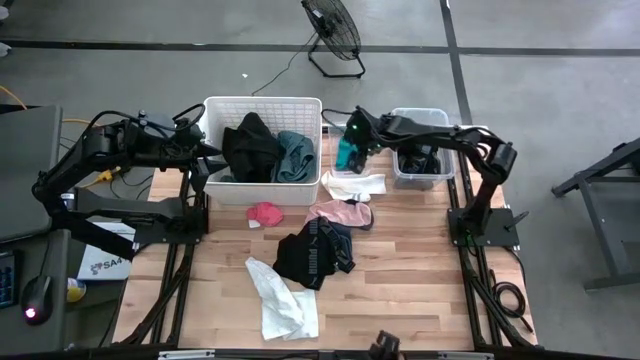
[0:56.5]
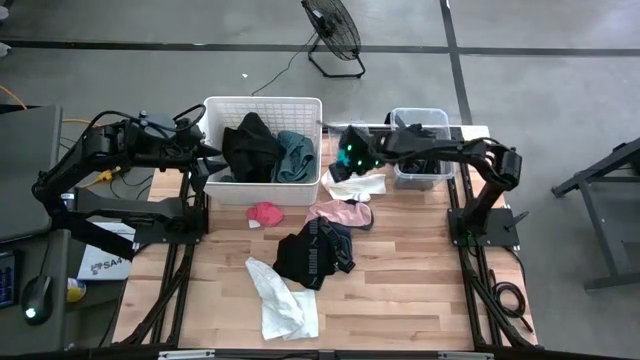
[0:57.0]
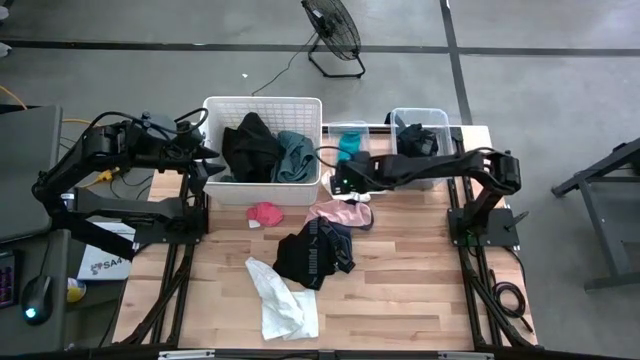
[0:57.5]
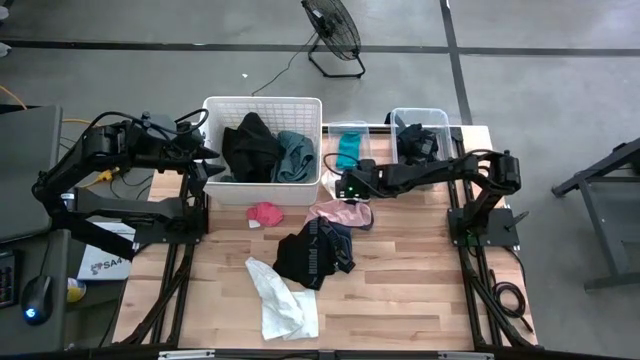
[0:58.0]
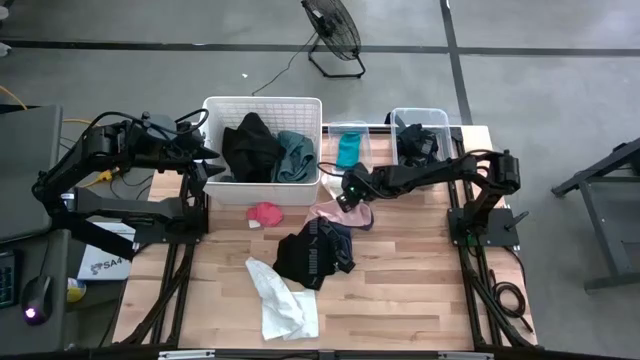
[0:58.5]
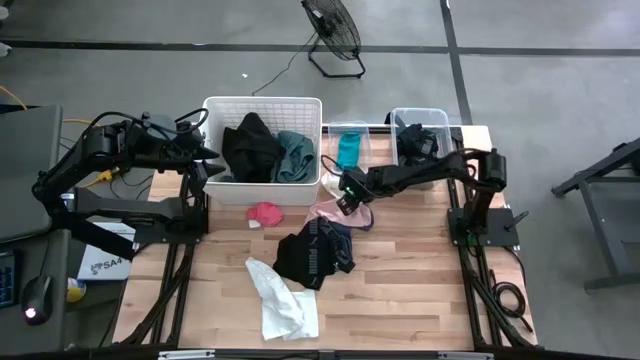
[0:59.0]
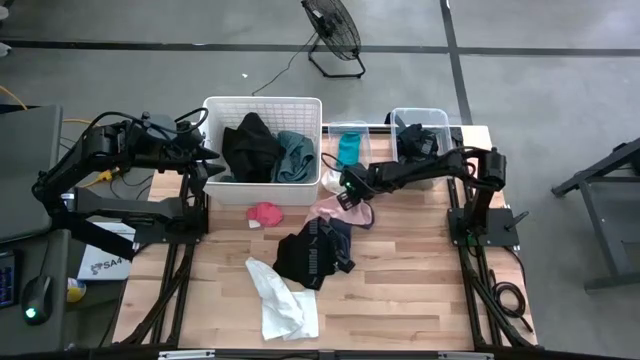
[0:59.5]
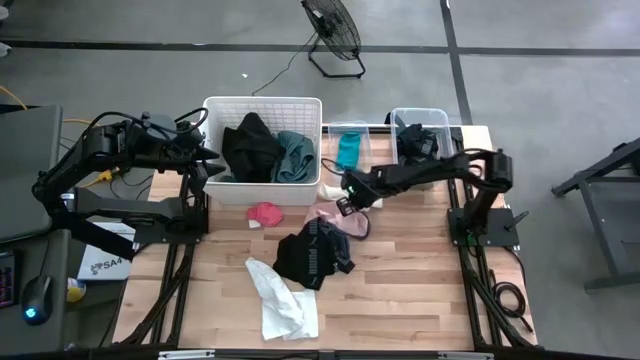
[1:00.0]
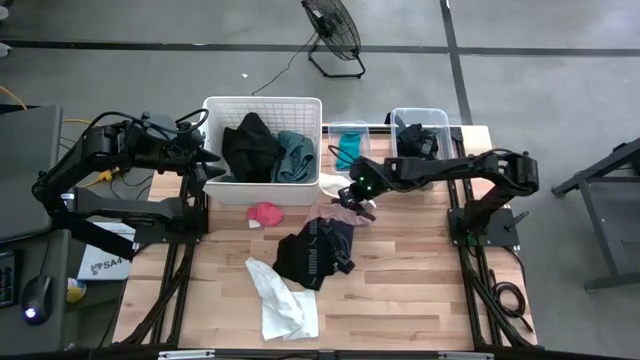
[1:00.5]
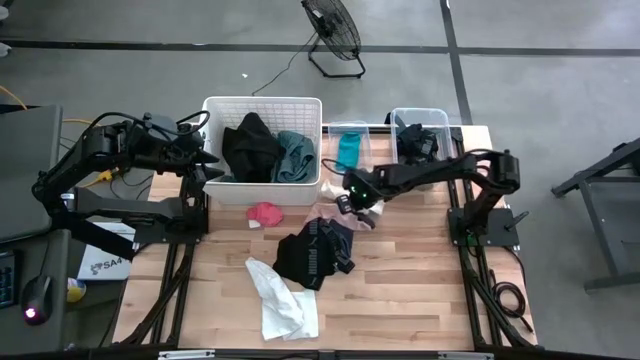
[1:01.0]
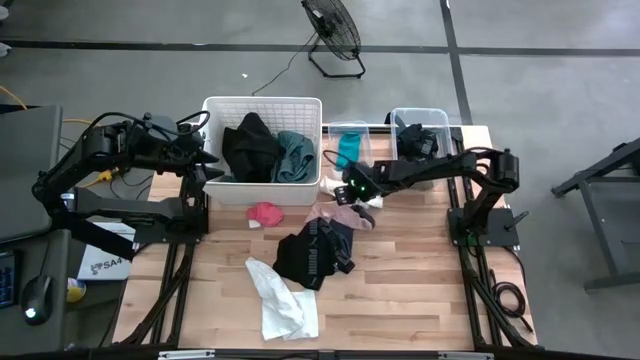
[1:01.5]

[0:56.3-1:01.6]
Task: Pick & Place Cloths
Put the white sock into the left transparent bin

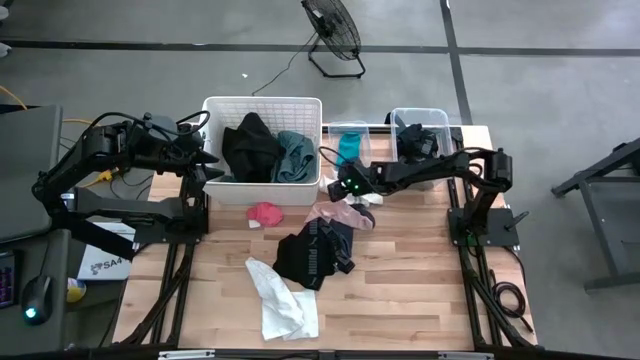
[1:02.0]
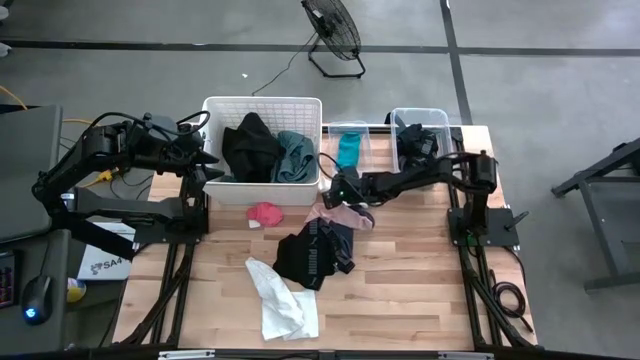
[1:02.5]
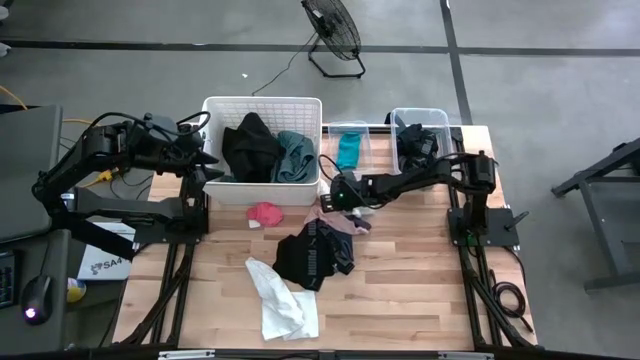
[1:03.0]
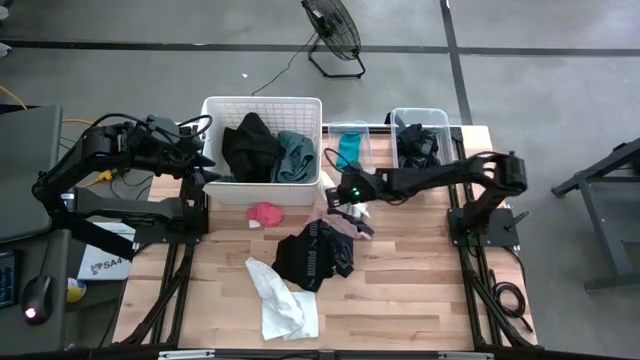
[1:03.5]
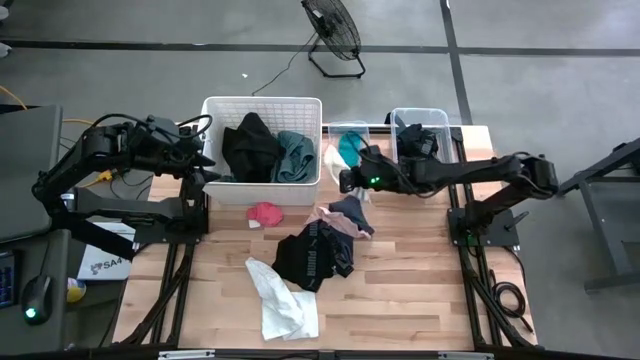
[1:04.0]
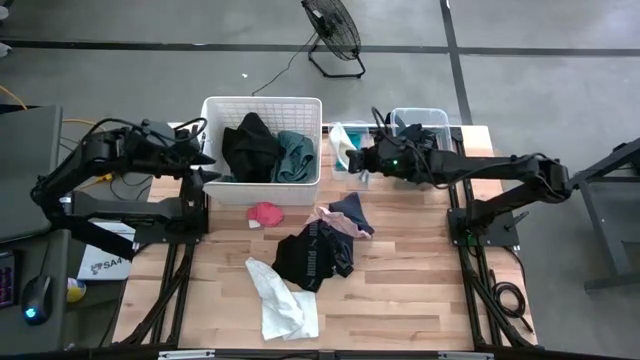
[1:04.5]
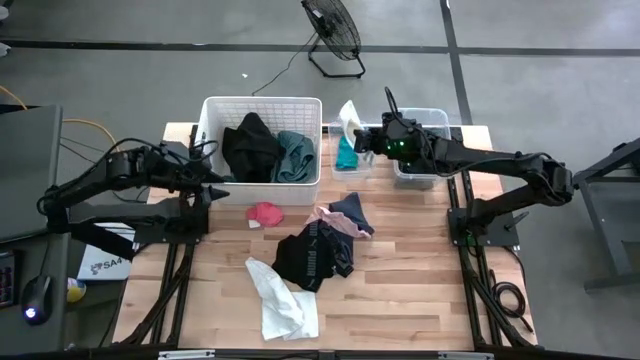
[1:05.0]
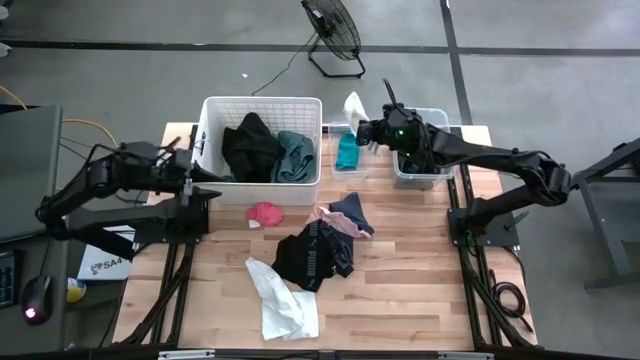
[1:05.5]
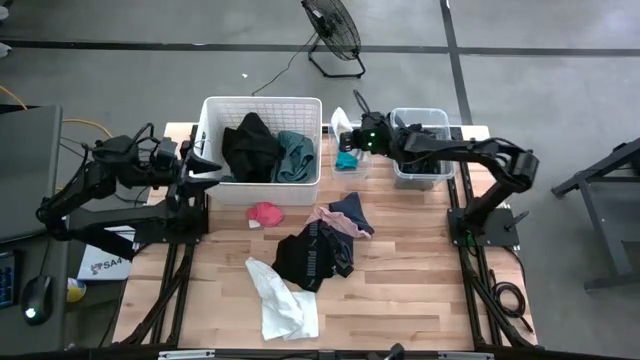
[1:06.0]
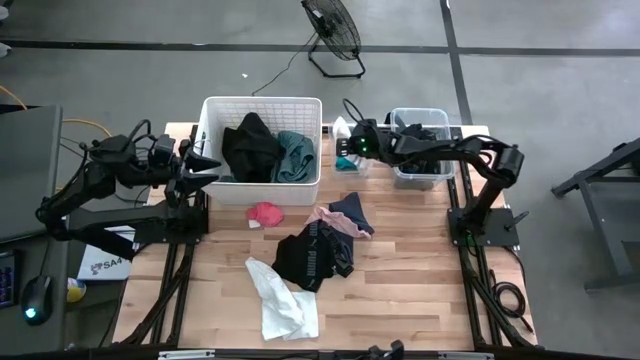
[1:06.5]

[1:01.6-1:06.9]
Put the white sock into the left transparent bin

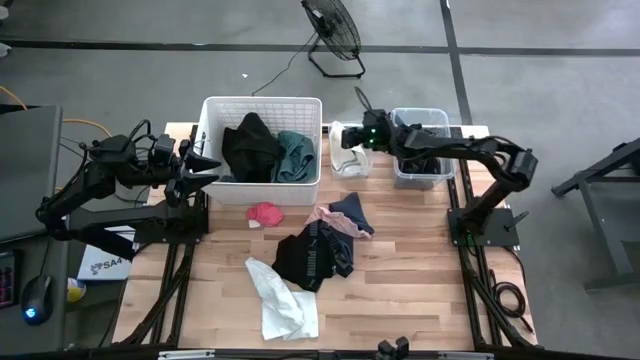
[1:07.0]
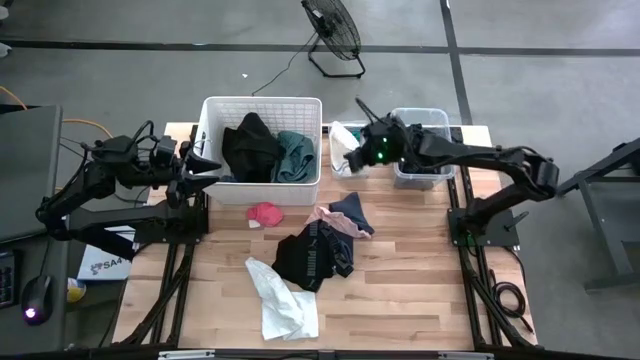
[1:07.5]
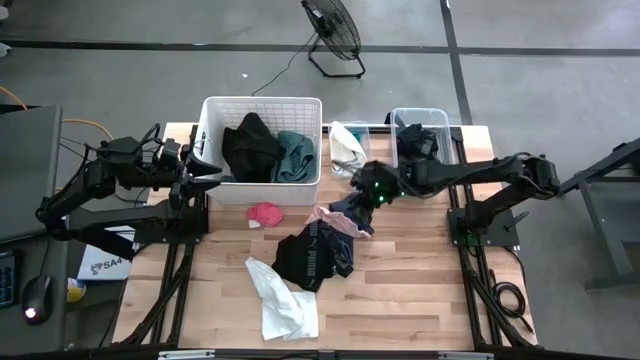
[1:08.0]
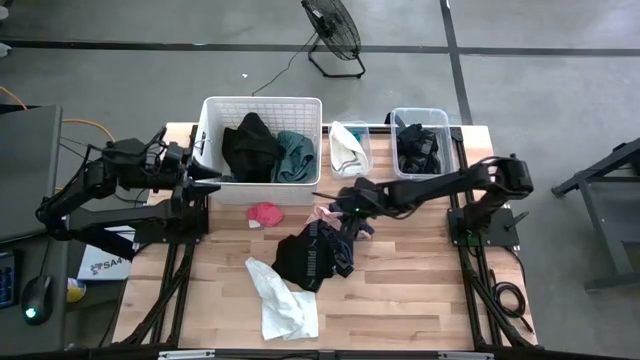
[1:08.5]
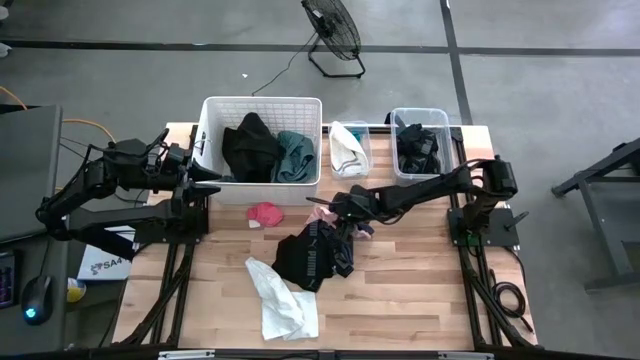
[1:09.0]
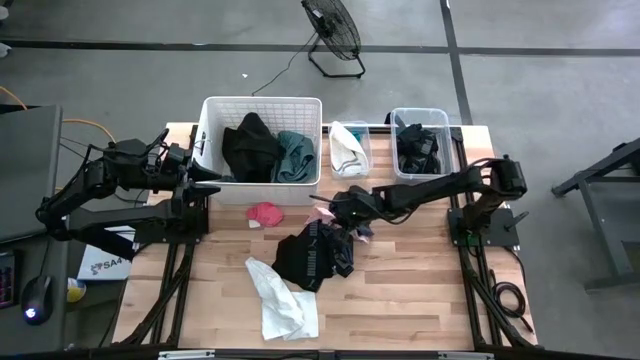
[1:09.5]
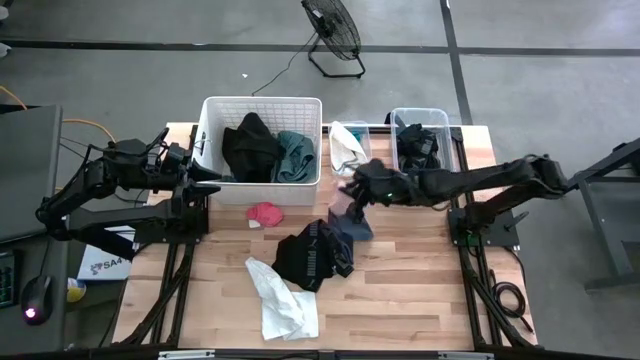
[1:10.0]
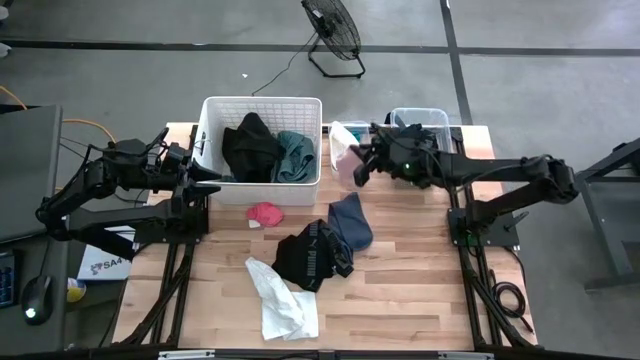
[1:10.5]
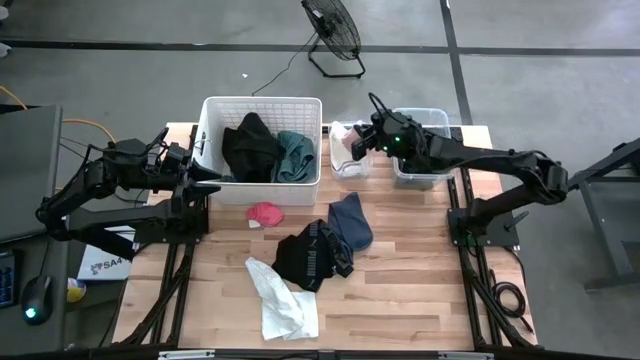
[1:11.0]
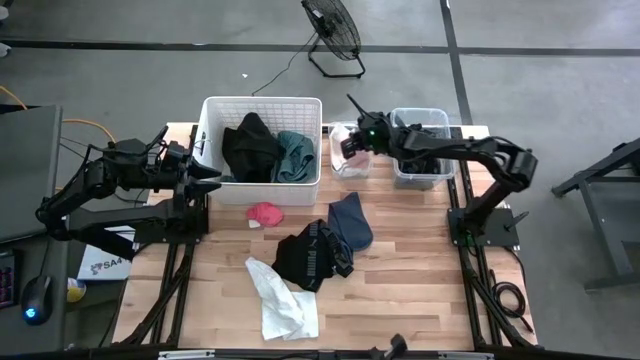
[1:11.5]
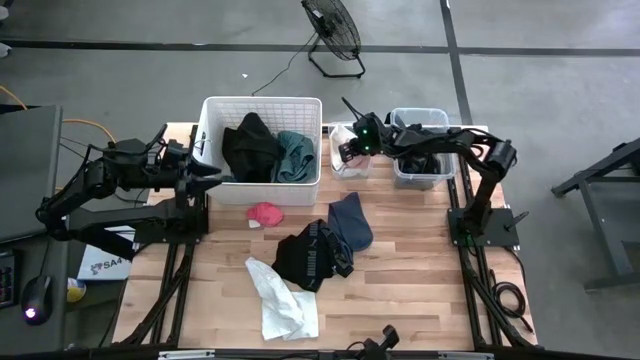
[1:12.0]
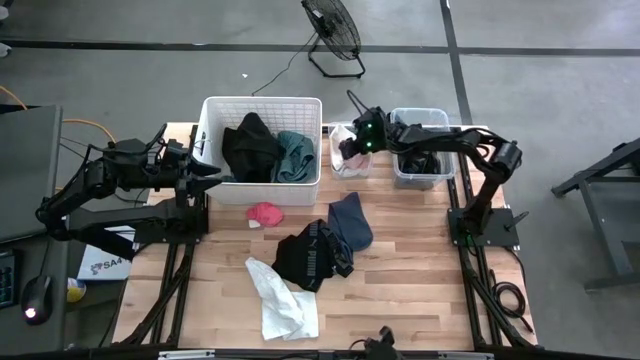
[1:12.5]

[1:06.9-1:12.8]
Put the light pink sock into the left transparent bin

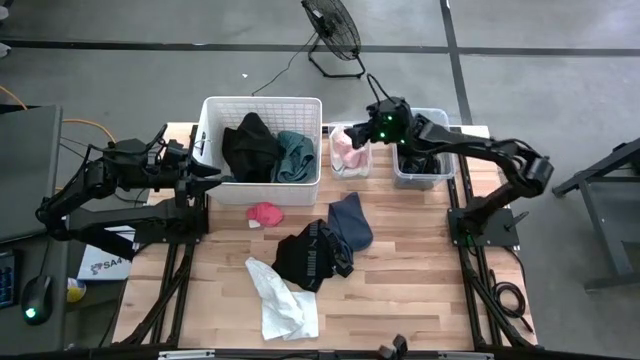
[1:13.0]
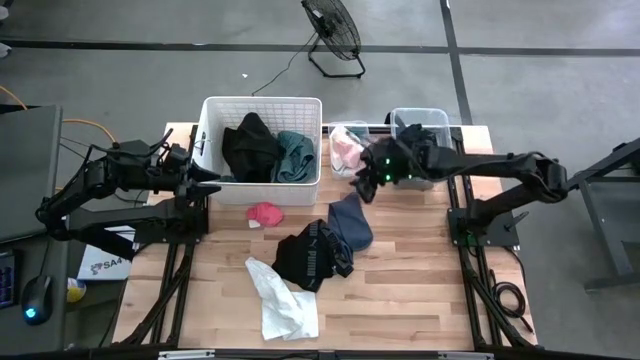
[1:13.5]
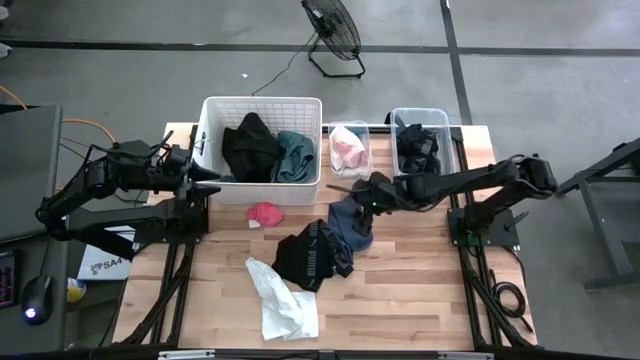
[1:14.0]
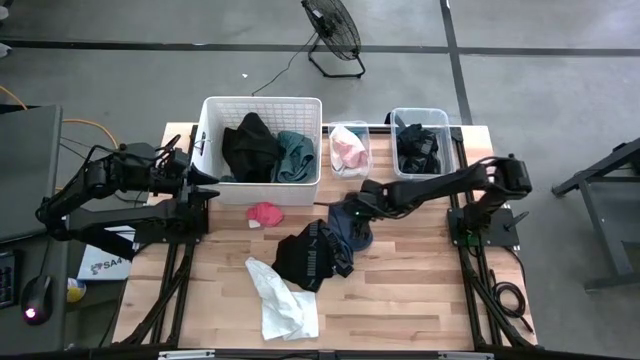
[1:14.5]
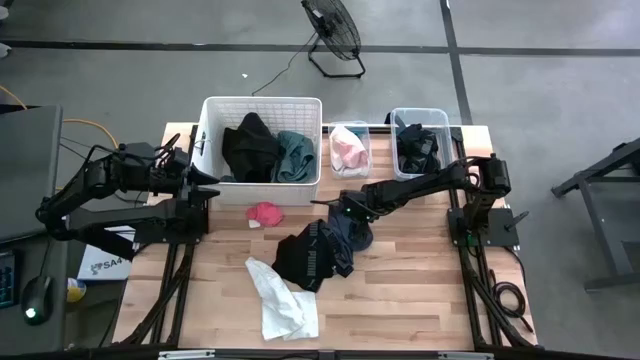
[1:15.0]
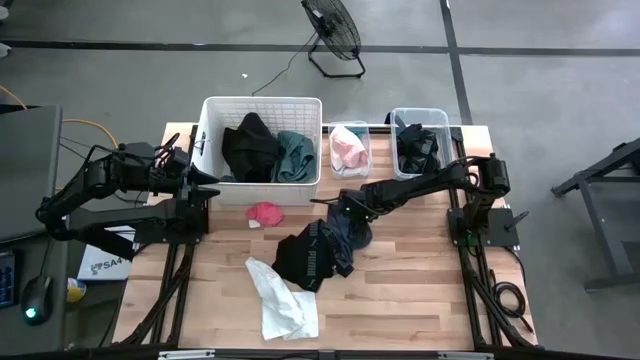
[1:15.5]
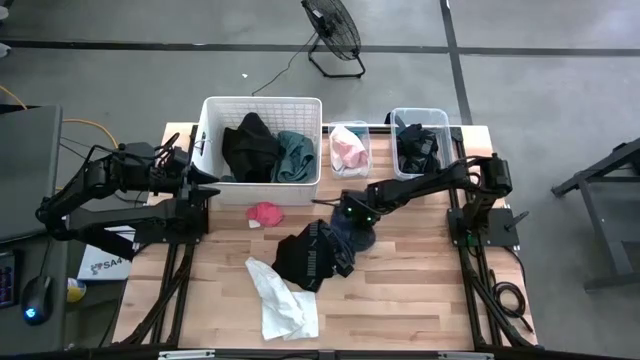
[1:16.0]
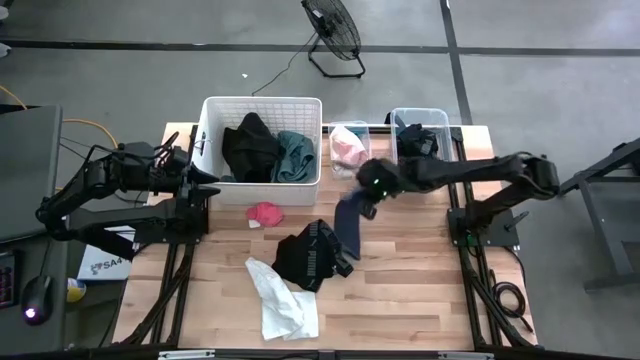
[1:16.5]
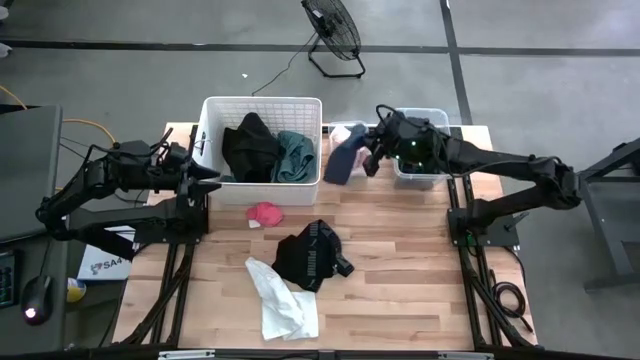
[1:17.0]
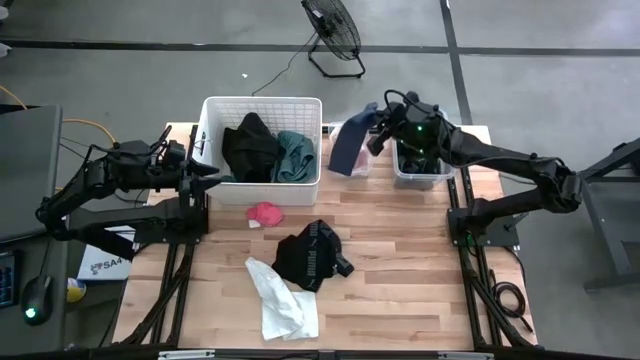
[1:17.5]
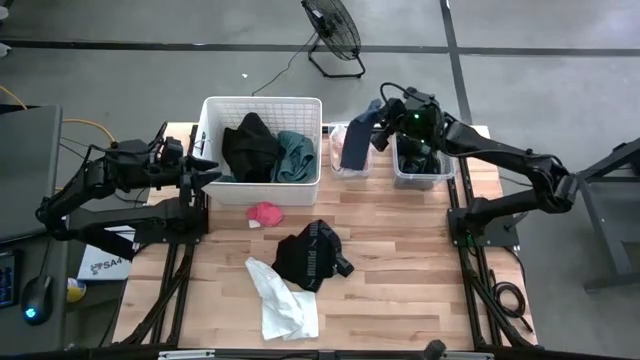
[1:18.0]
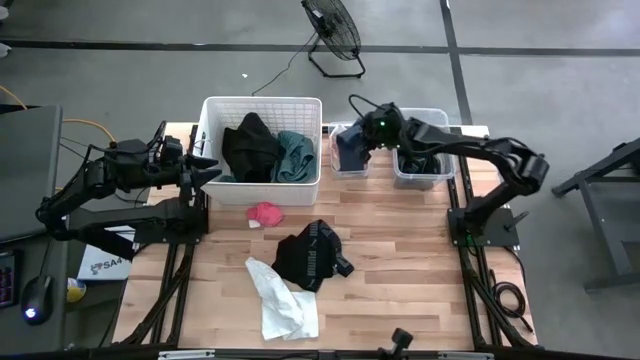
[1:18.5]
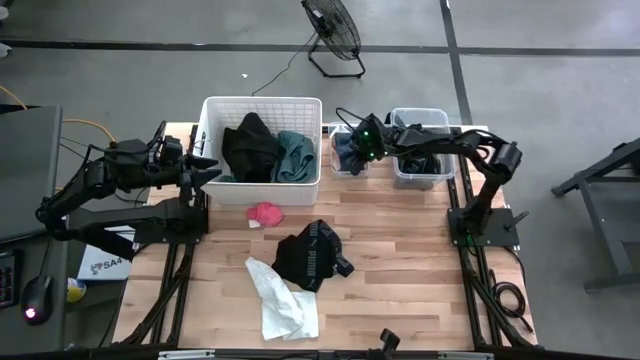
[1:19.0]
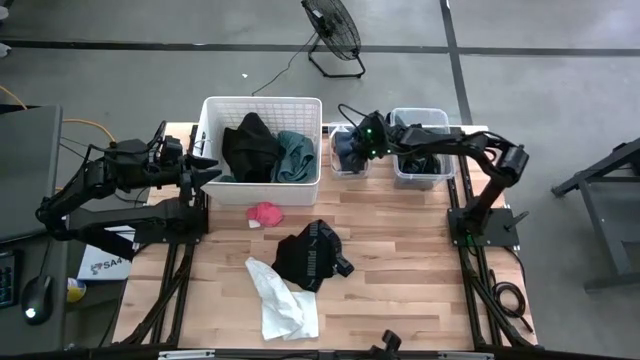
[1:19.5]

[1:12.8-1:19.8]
Put the dark blue sock into the left transparent bin
